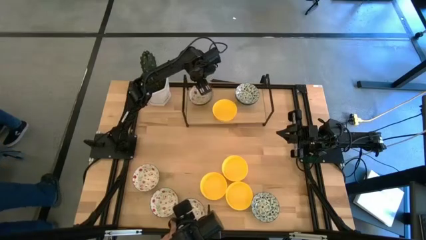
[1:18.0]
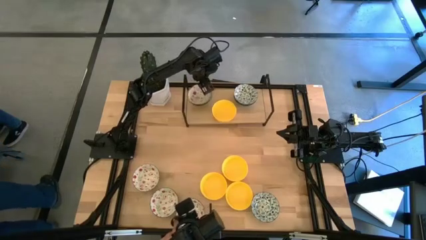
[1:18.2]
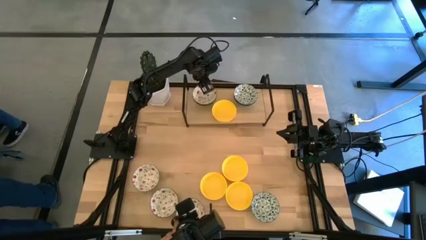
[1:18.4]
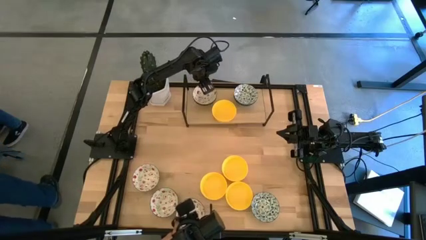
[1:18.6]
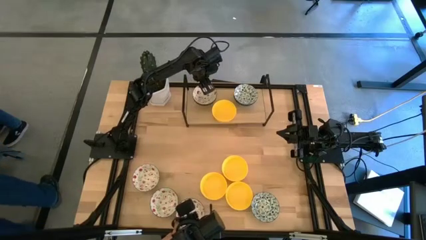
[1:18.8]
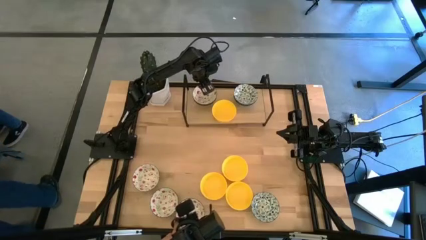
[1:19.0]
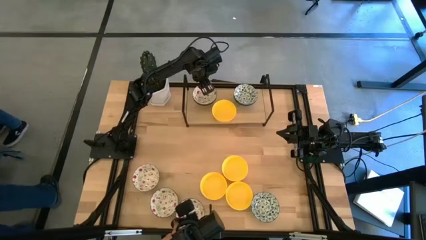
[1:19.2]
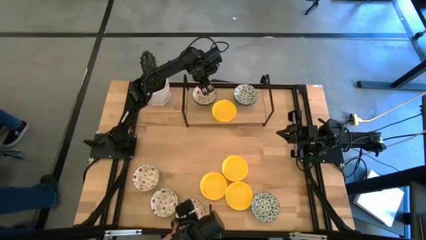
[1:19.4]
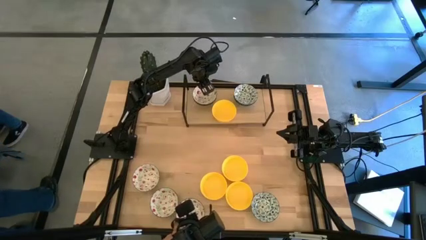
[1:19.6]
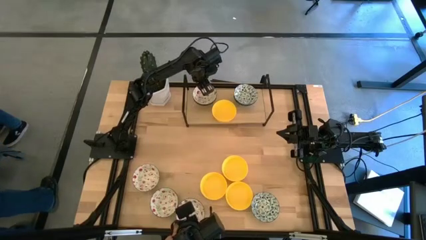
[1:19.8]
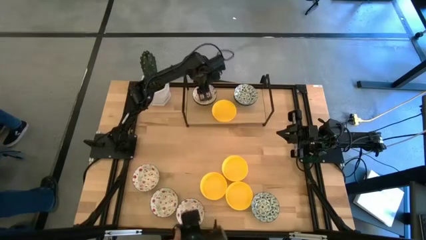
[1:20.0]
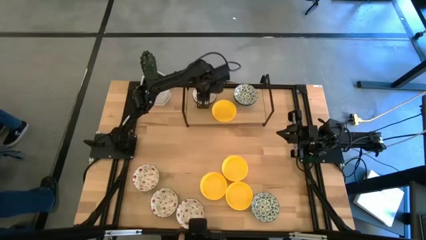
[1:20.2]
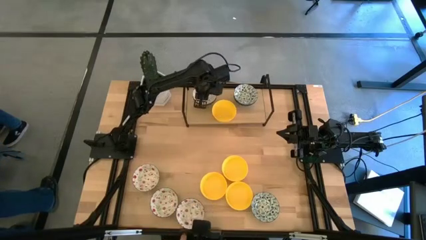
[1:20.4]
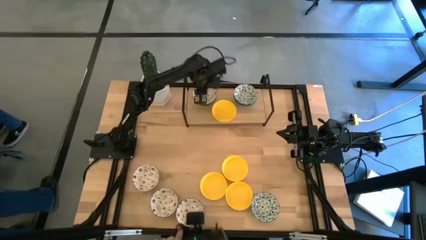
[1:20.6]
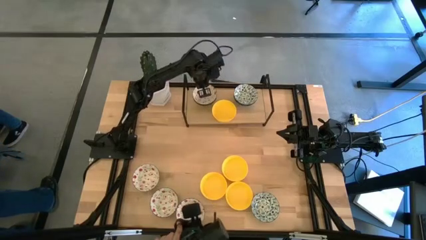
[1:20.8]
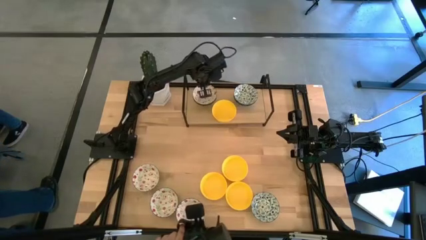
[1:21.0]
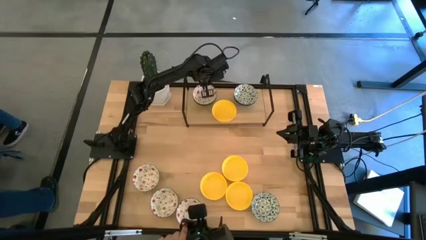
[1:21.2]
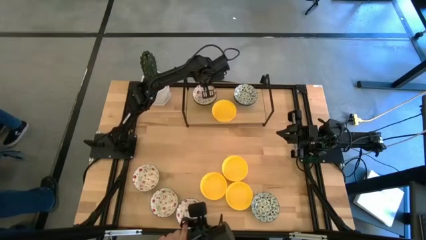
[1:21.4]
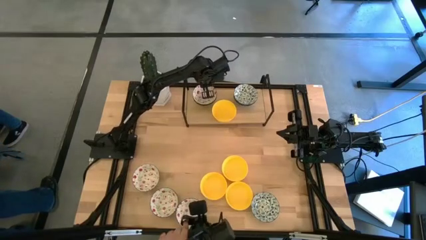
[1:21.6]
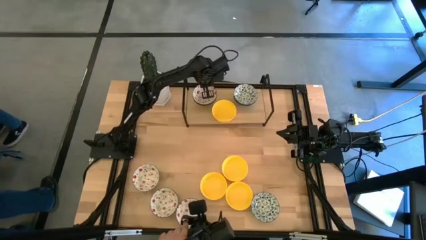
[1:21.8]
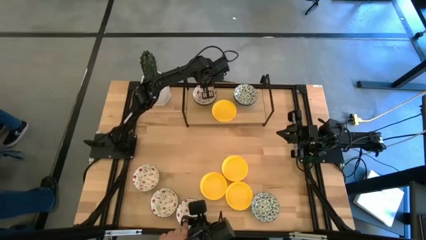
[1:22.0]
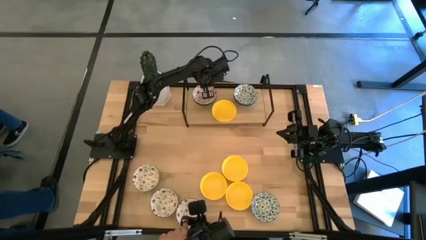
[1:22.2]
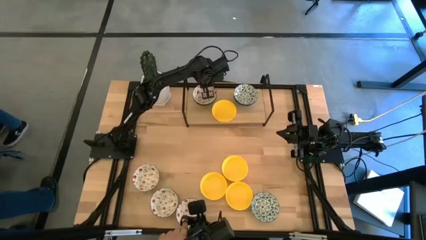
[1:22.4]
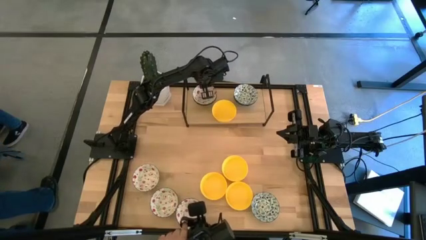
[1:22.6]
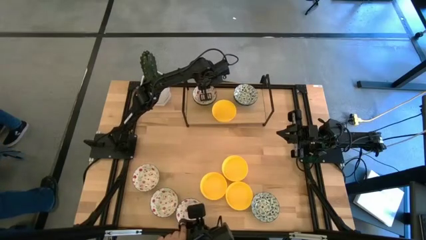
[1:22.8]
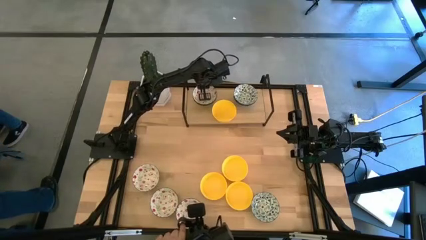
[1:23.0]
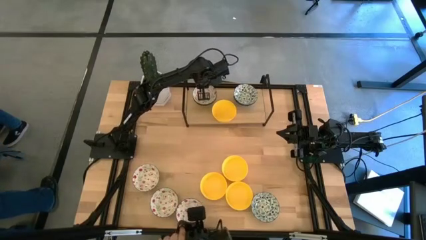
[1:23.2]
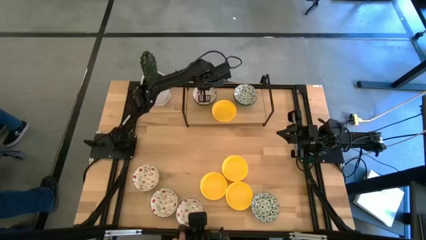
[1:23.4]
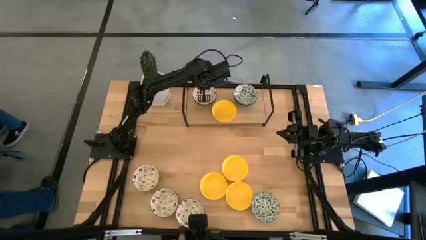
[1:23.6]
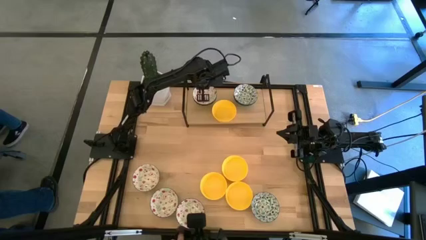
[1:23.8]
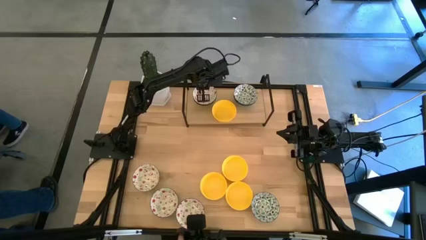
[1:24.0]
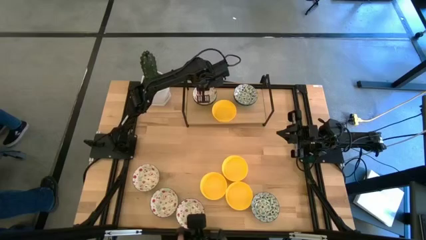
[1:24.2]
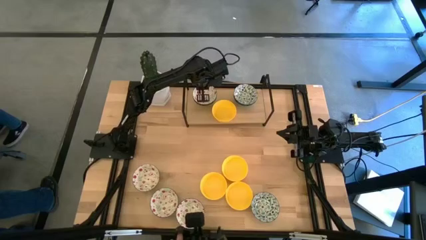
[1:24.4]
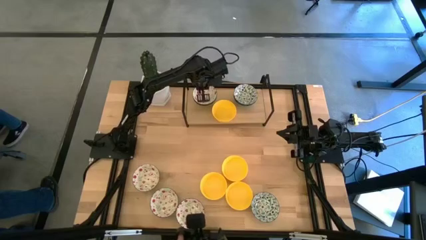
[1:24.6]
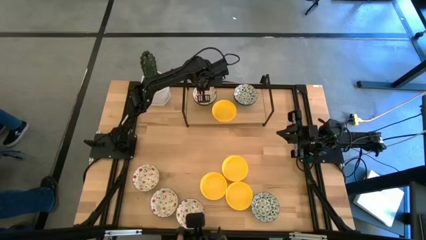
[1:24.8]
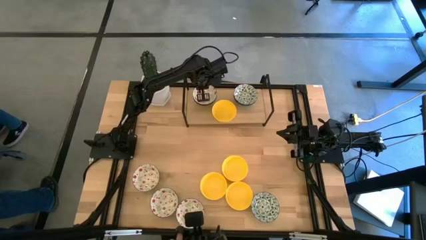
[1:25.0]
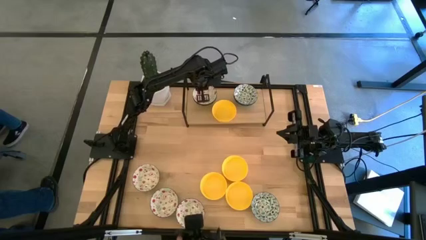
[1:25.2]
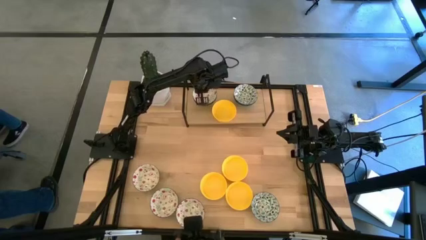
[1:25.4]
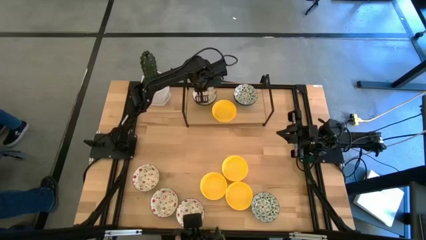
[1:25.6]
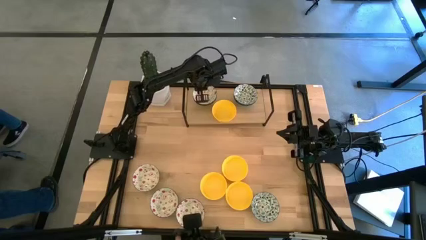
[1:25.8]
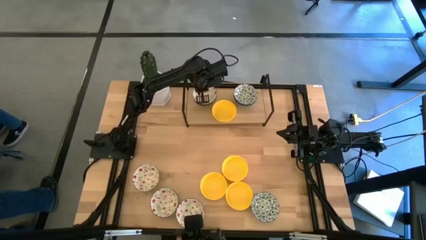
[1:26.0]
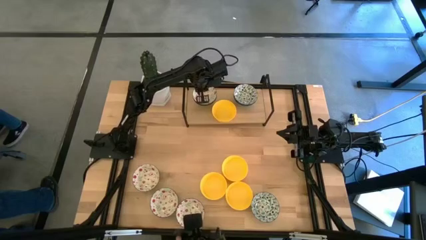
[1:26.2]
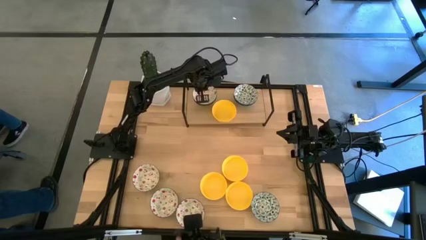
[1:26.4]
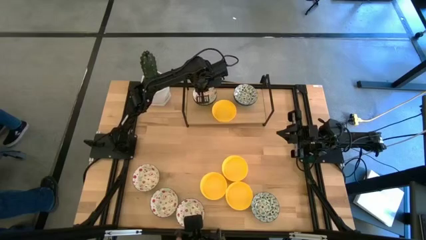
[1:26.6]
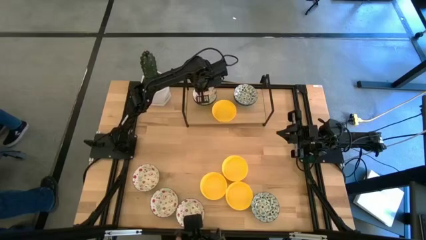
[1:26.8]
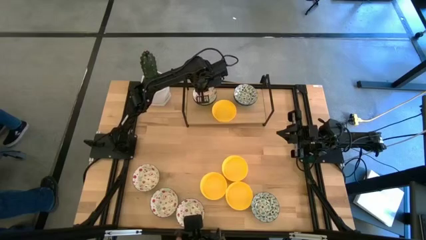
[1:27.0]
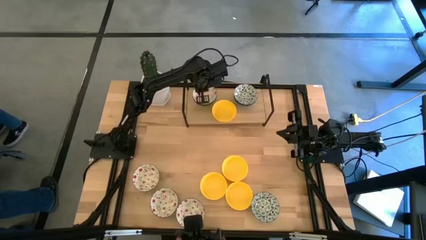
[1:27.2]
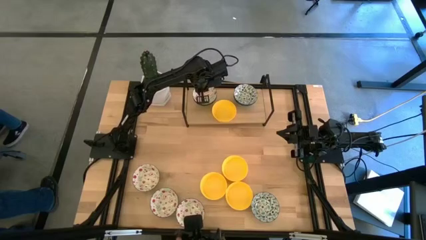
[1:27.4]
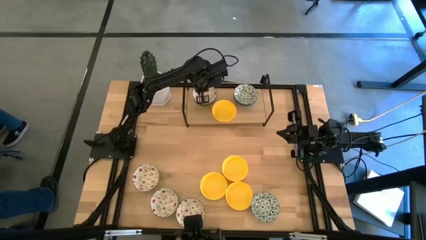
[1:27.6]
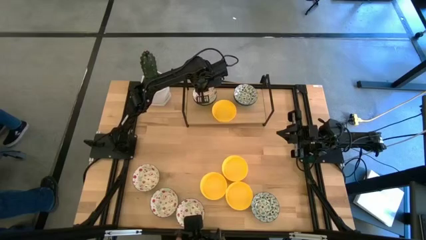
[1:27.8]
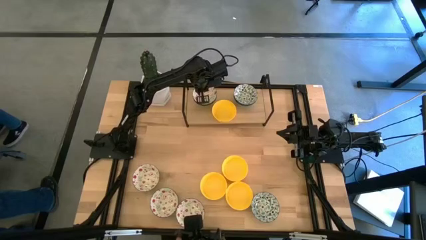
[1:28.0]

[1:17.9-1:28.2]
Task: Pick & Place Mini bowls
Stack the blue bowl on top of the blue bowls on the shelf

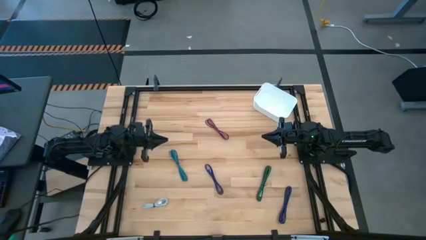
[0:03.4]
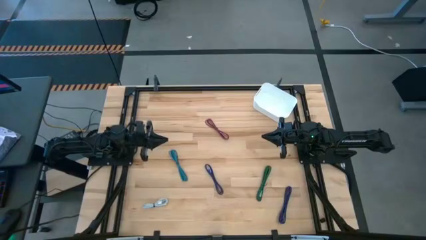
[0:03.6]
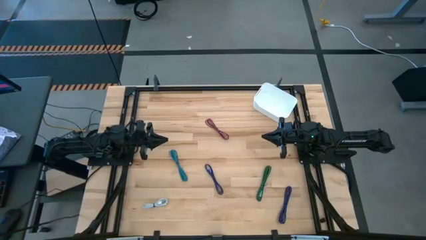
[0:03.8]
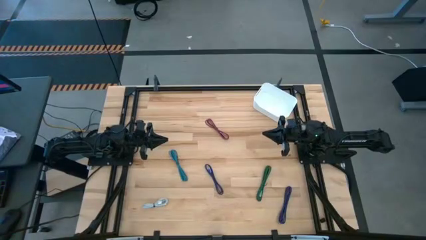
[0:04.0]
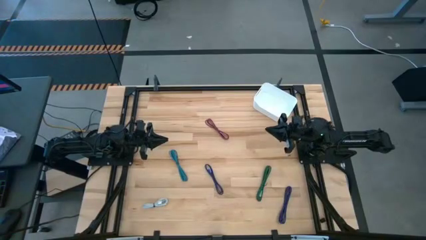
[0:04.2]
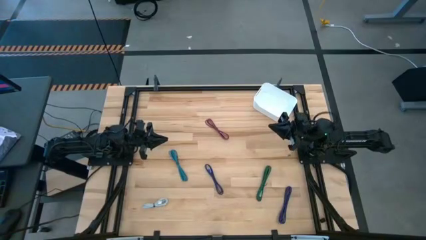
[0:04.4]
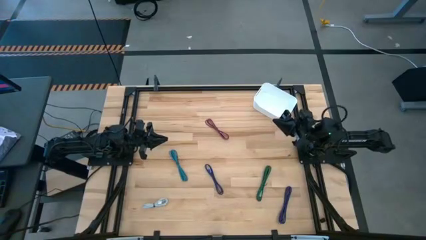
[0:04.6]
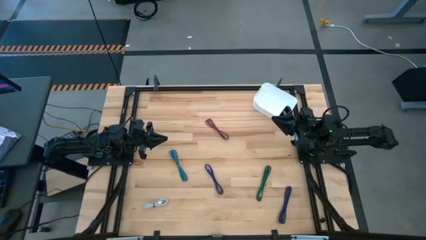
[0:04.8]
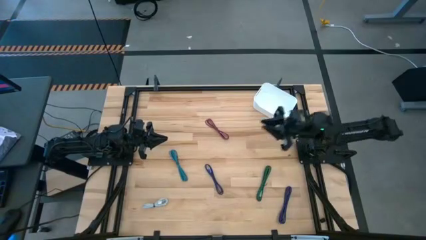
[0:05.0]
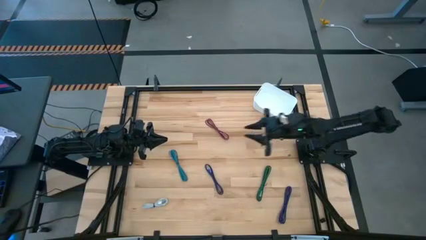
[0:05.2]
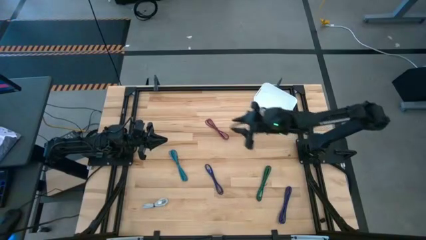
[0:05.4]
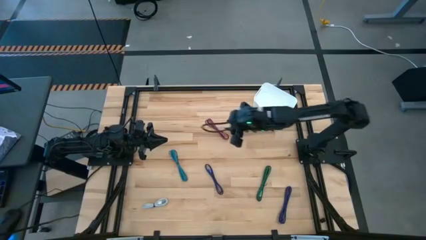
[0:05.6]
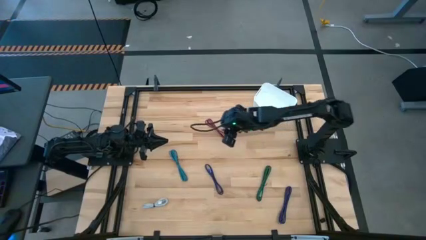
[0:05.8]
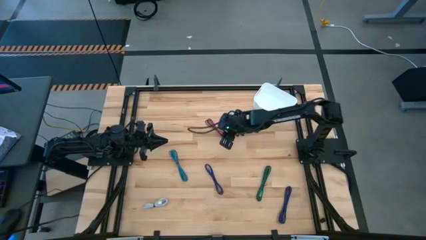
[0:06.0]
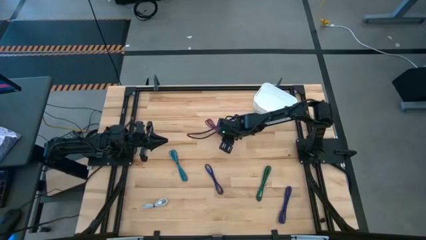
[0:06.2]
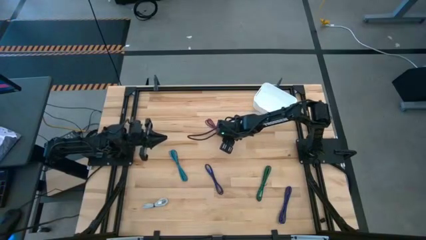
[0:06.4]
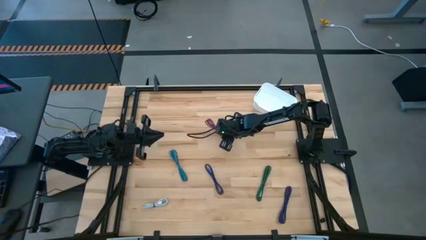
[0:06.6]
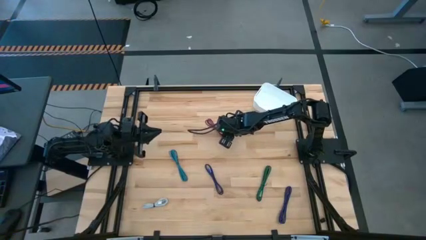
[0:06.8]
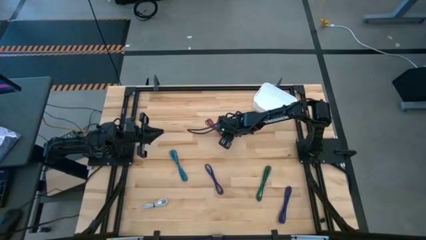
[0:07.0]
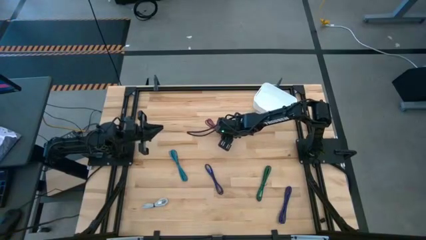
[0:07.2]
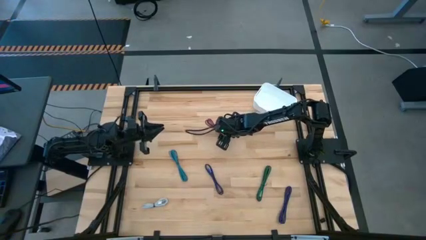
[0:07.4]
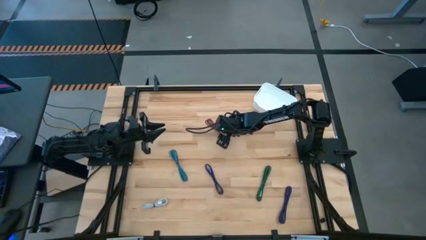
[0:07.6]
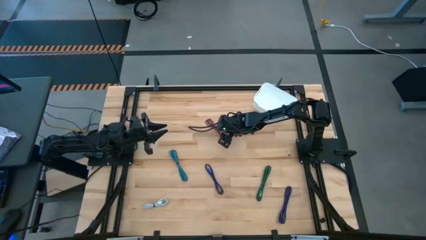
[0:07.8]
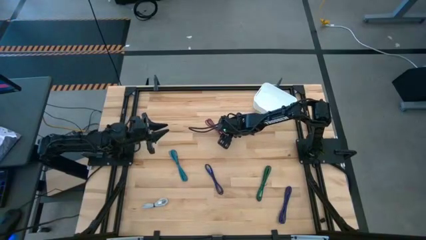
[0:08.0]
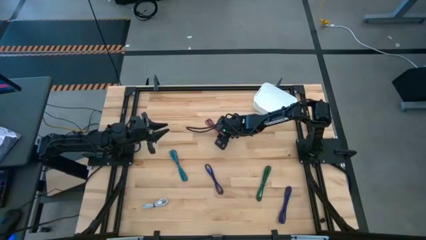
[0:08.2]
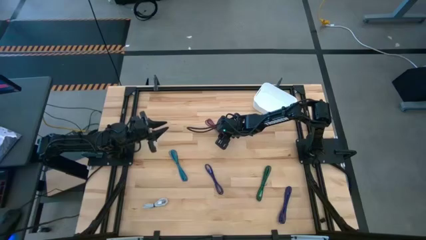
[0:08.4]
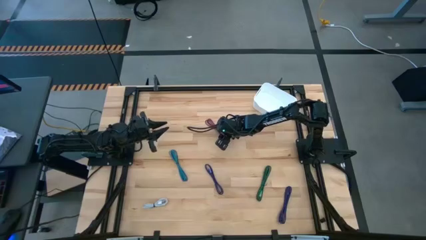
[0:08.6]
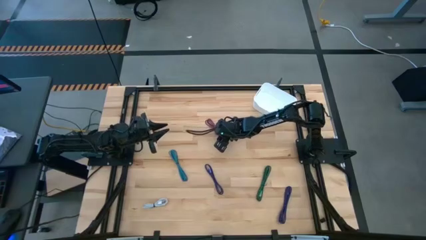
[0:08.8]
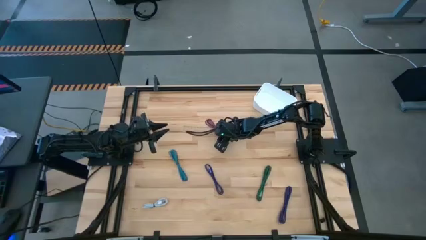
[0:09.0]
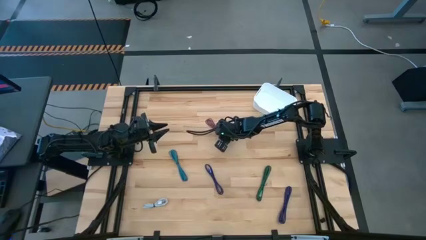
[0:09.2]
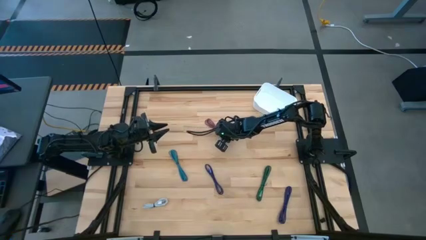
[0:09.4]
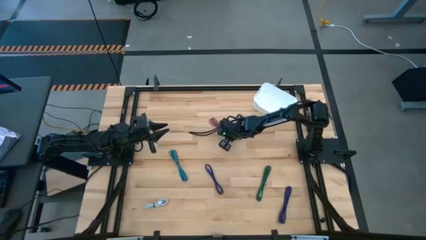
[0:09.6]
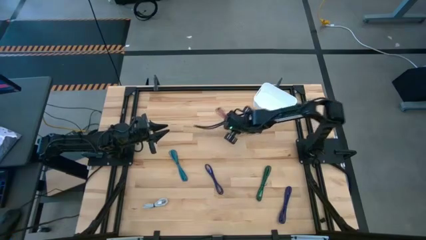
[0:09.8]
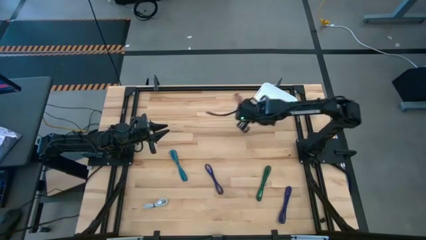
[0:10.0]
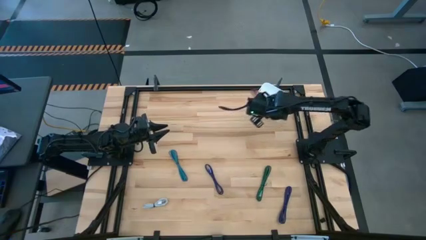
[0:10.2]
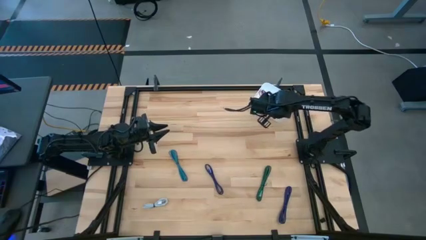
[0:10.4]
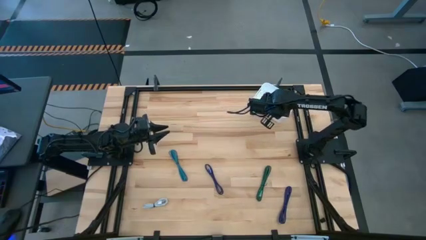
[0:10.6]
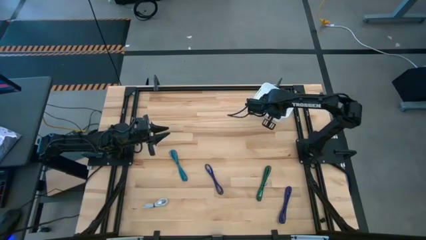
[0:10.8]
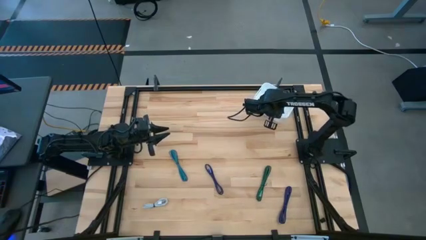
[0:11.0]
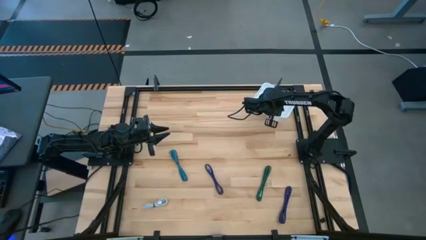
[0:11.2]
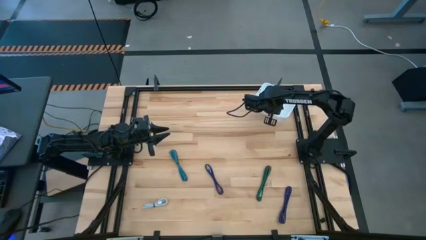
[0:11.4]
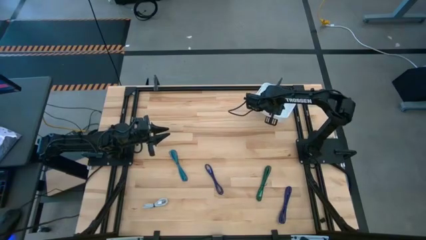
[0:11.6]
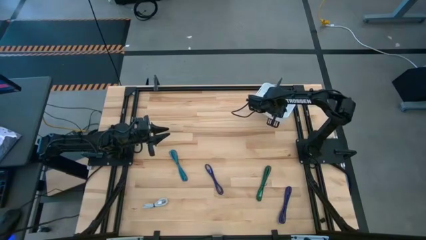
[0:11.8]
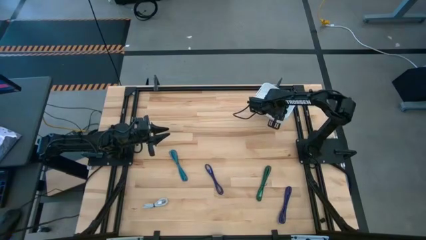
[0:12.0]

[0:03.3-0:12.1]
Task: Pick and place USB-C Cables
Put the pink charger cable into the white bin
